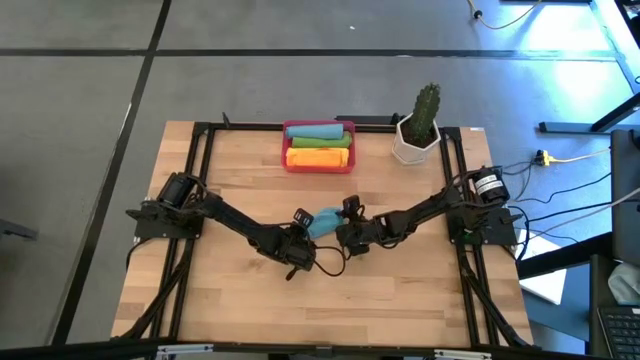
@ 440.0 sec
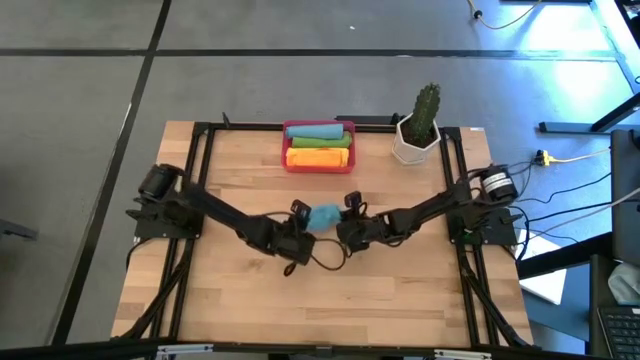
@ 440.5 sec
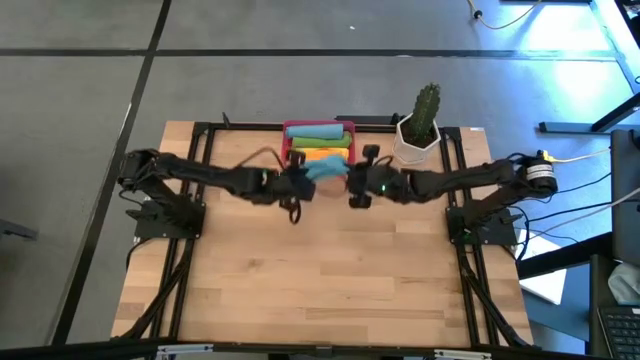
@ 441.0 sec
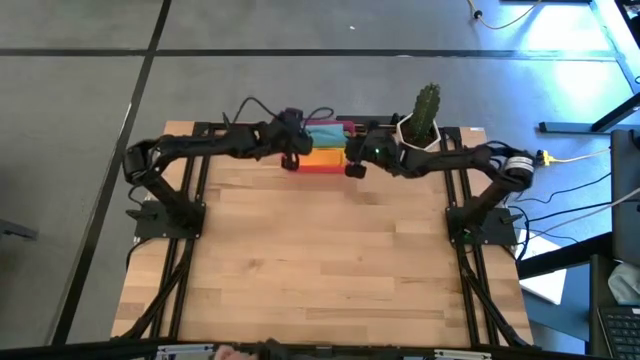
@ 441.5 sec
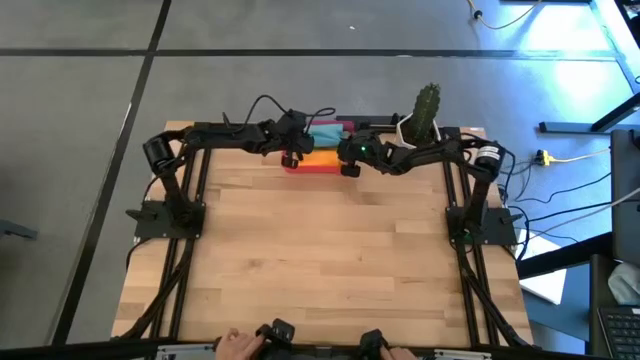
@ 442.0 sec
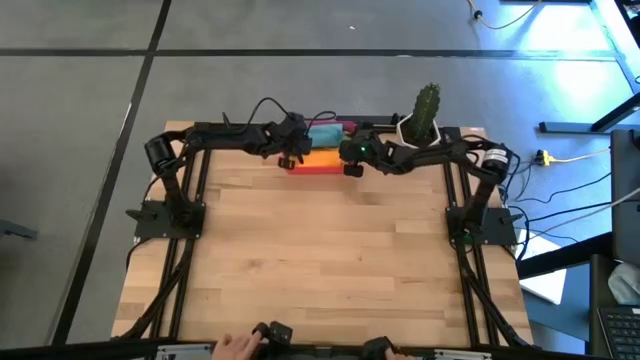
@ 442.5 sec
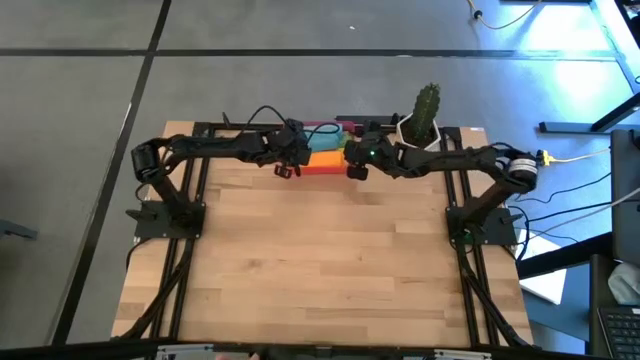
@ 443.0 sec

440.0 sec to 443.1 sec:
Task: Roll microfiber towels into tight, uniform cylinder then place into a basket
Put the rolled blue towel into the red bin

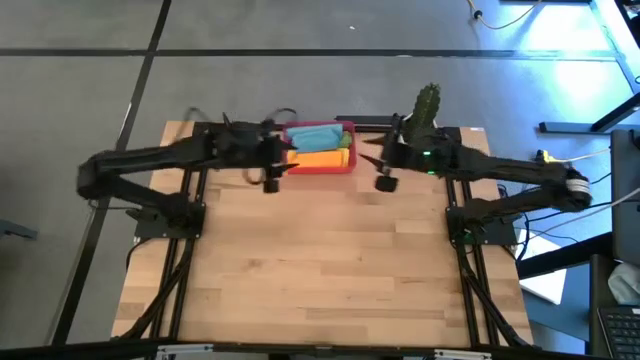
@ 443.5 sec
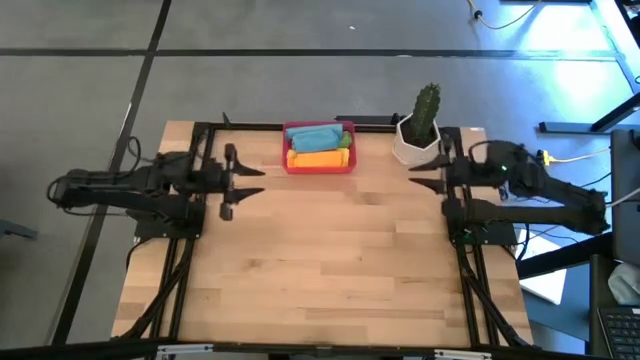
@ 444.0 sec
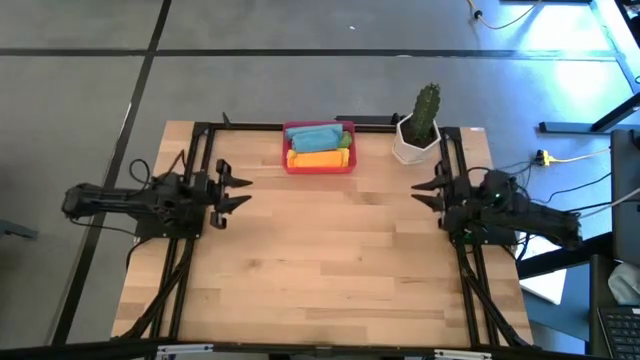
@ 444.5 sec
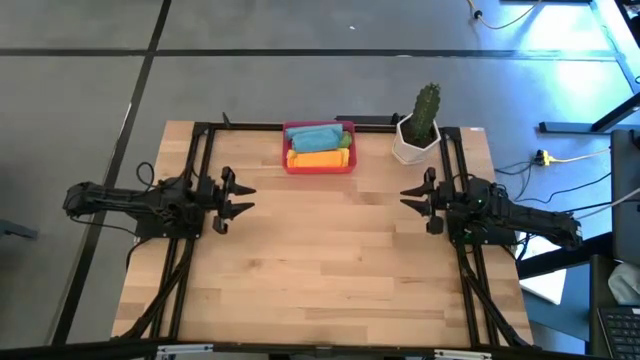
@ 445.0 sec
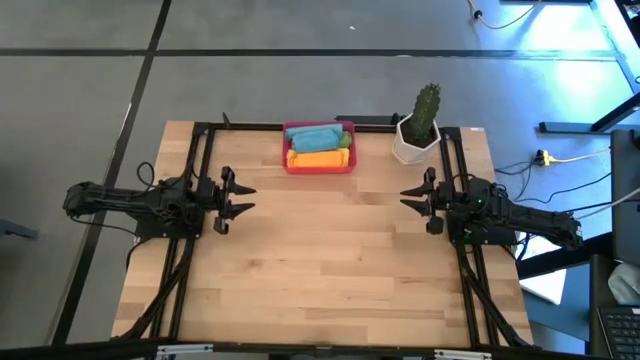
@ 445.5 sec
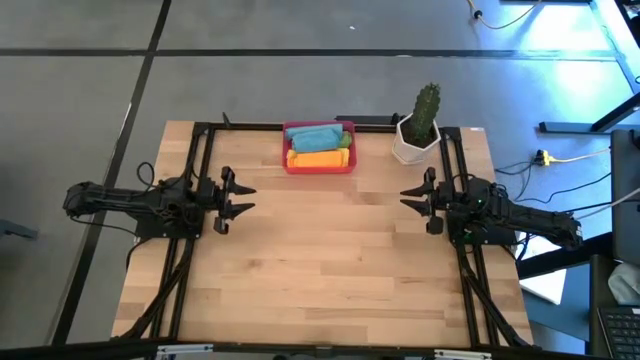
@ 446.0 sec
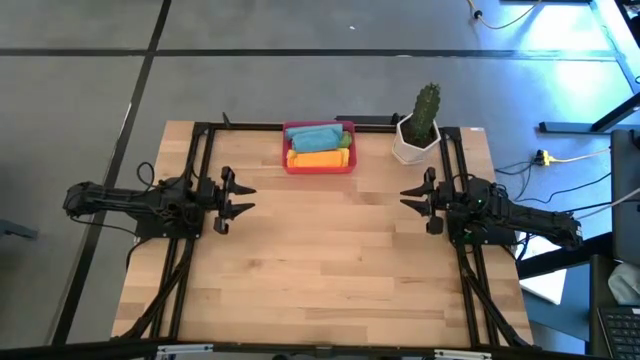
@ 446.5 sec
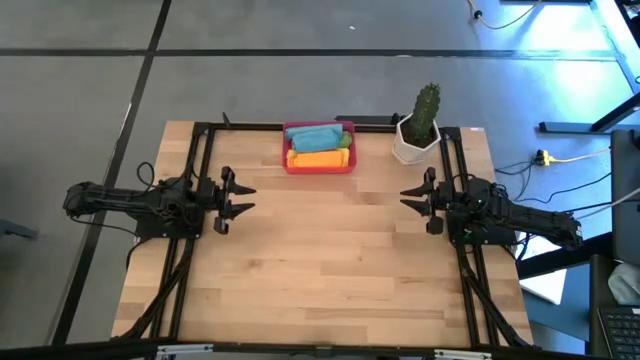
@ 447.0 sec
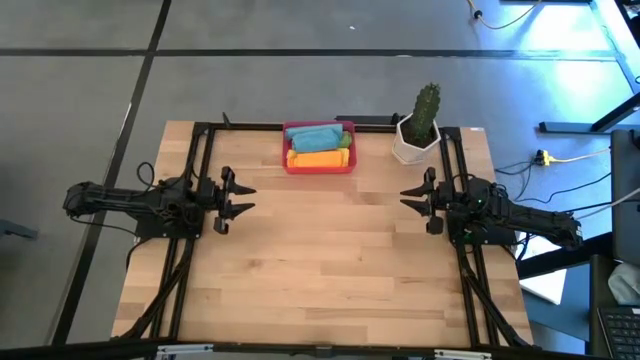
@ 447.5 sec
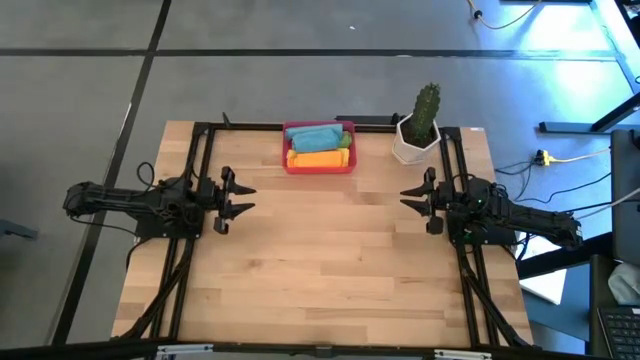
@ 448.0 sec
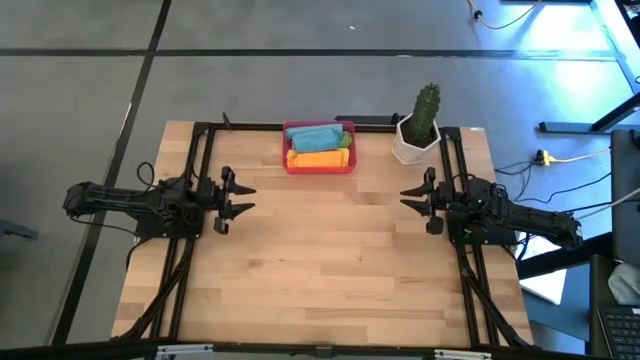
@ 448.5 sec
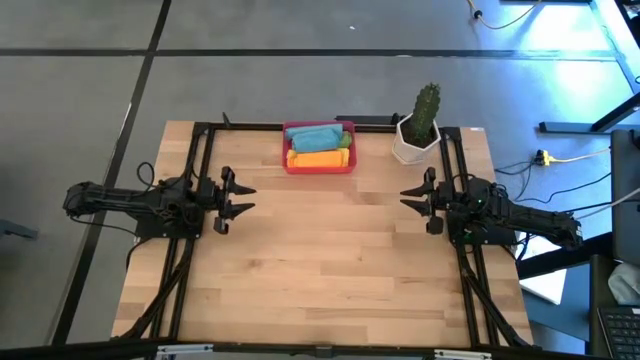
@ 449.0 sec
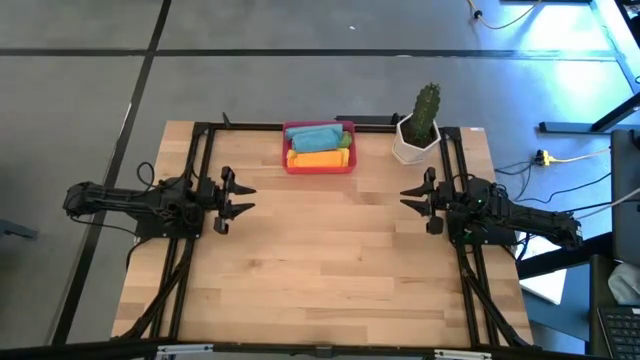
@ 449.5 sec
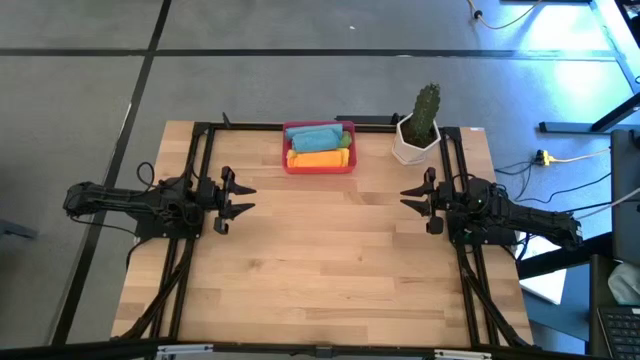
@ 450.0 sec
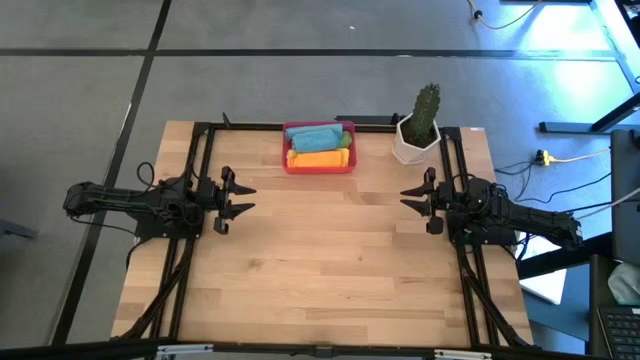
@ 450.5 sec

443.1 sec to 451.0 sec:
Return to home position

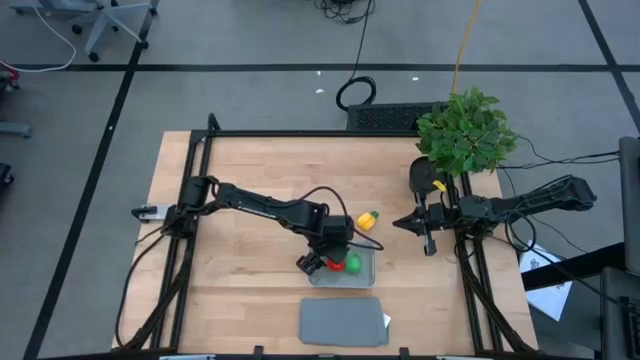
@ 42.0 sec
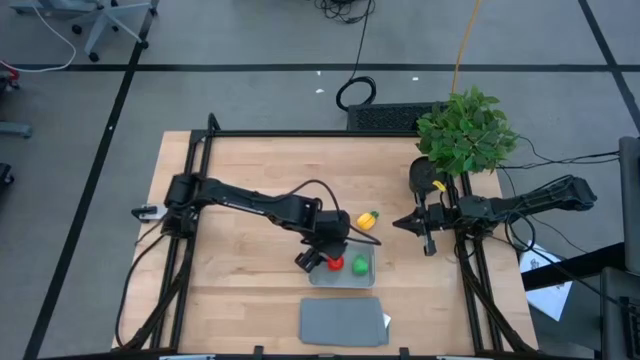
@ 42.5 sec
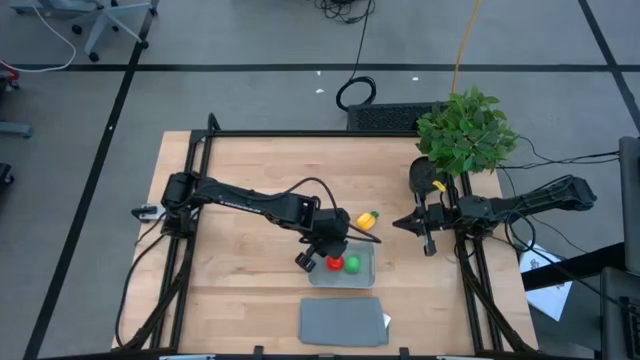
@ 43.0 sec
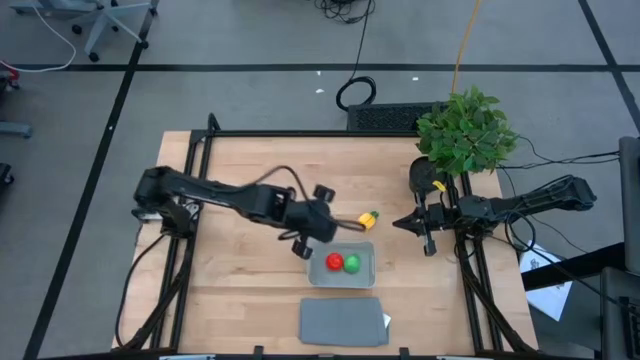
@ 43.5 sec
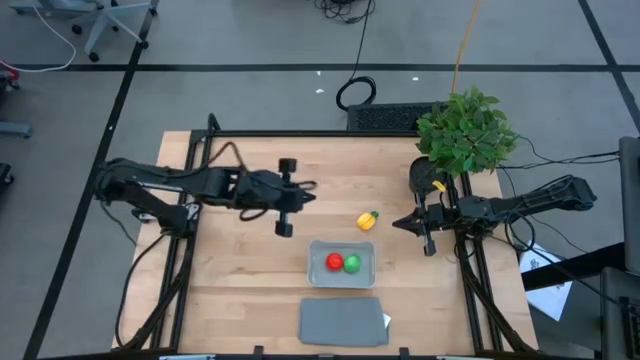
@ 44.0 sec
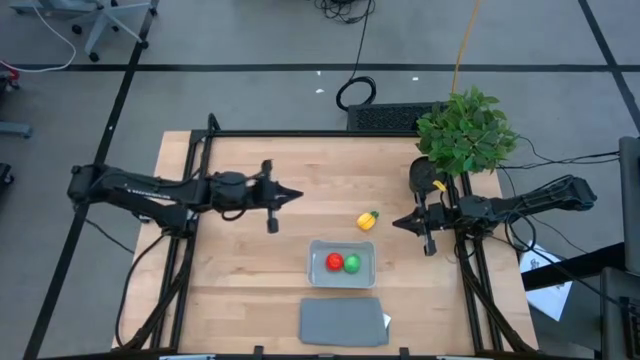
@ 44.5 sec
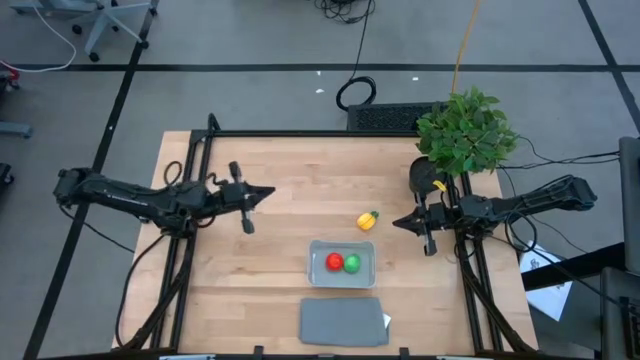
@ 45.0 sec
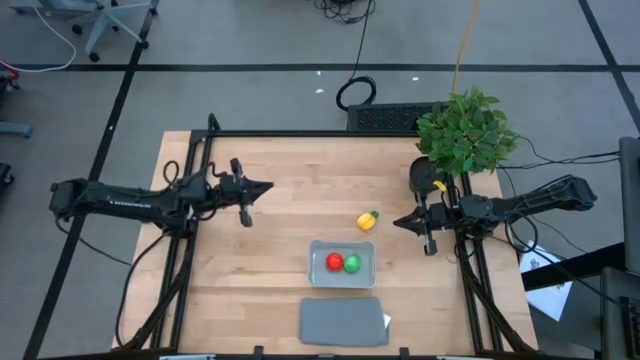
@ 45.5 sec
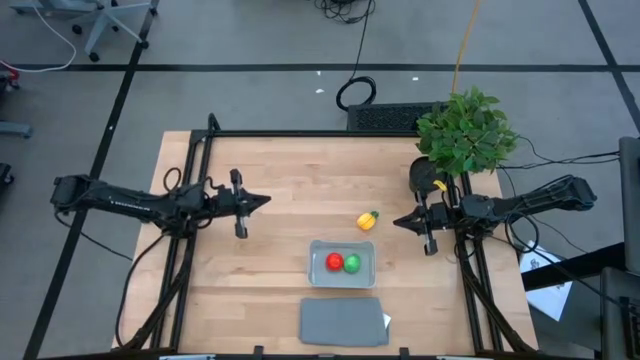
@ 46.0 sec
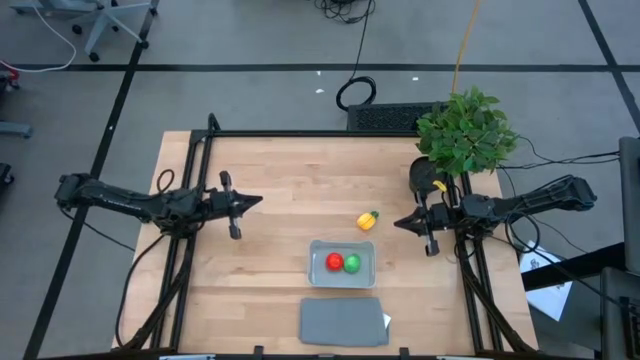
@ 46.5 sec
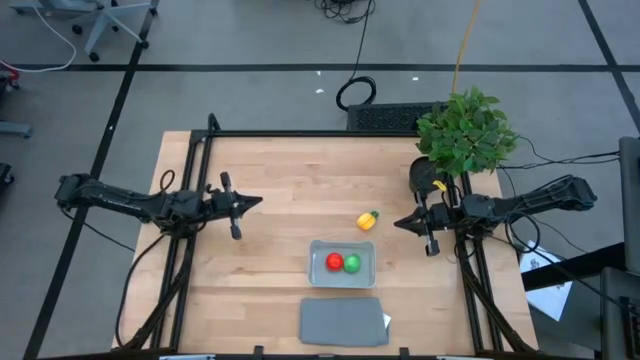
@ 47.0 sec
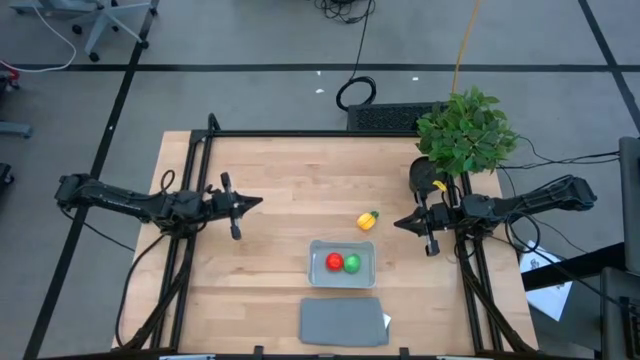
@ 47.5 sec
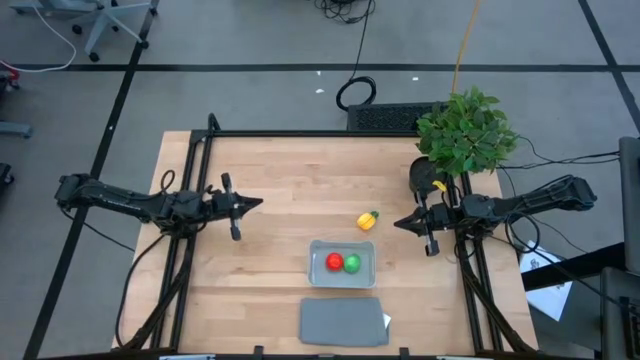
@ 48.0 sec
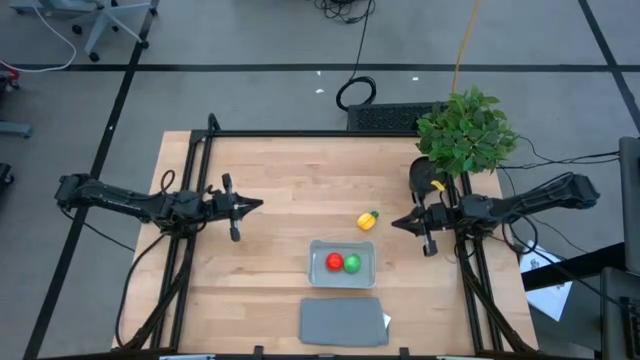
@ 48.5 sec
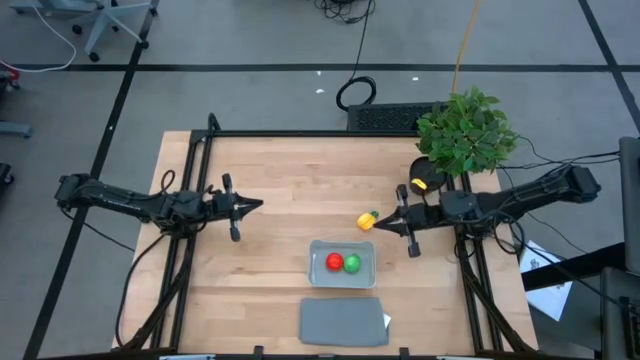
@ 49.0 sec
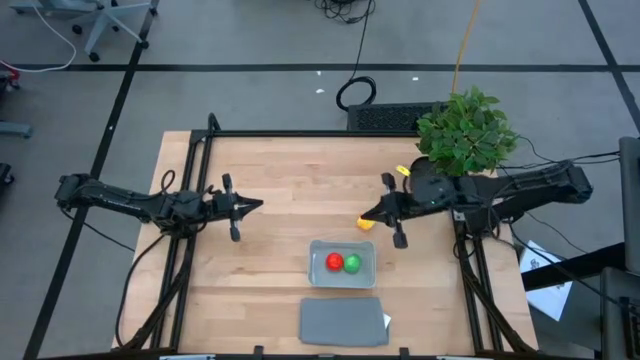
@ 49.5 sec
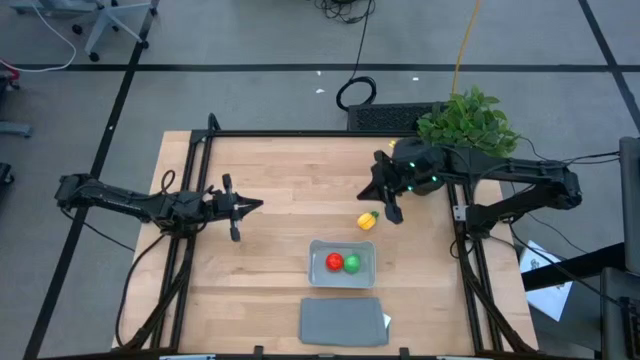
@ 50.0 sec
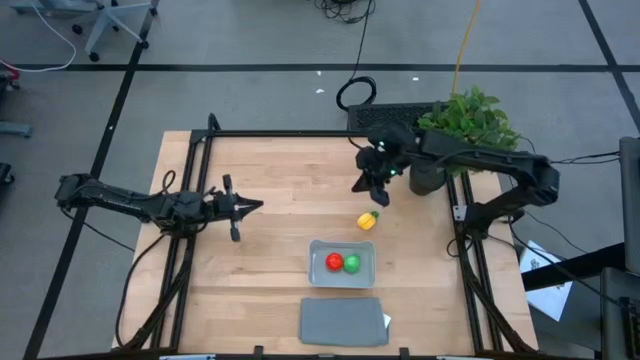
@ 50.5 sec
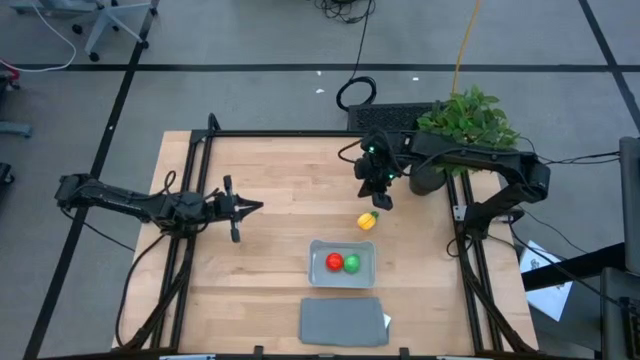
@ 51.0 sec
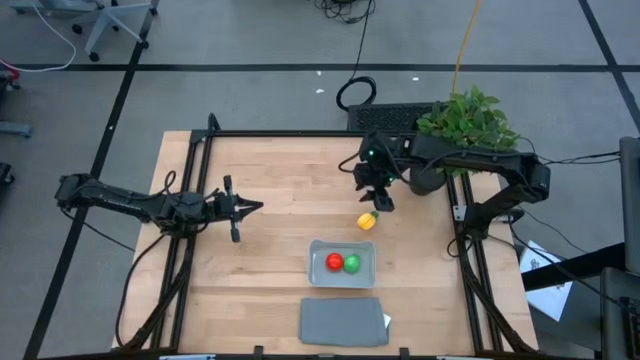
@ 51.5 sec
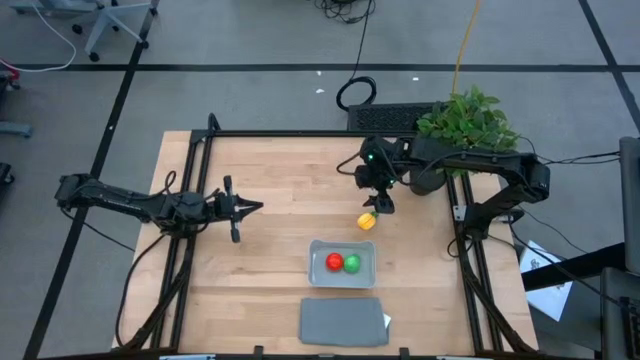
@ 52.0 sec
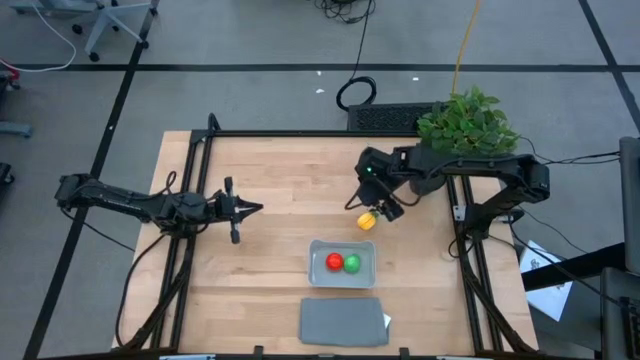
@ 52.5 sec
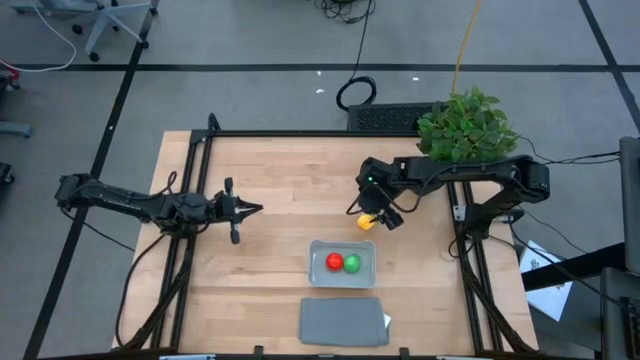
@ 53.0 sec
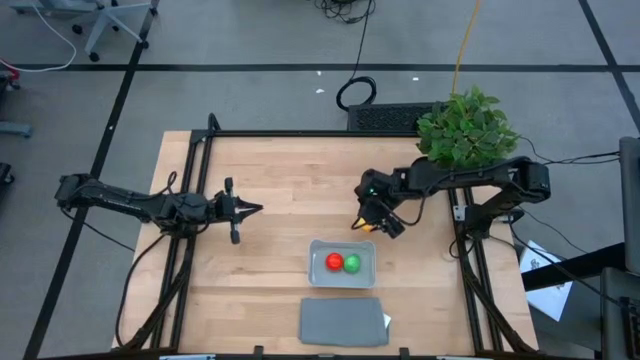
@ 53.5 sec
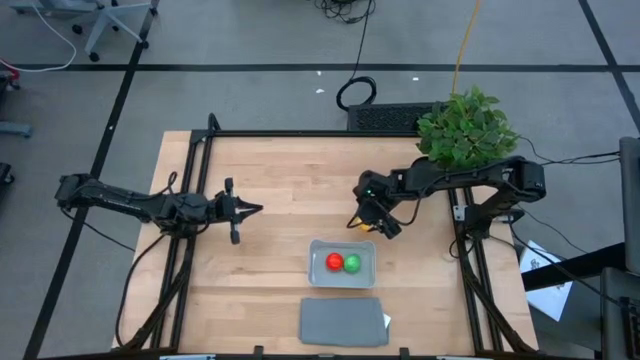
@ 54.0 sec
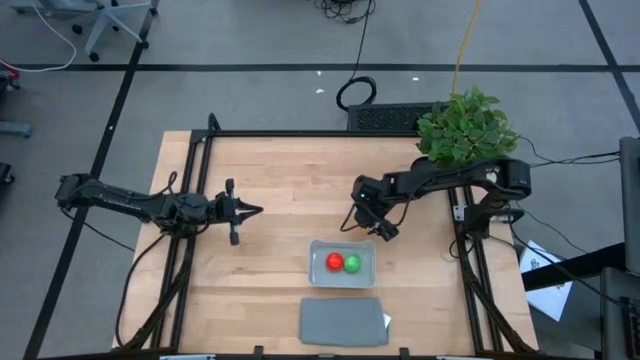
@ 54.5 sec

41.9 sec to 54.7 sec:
Task: Pick and placing Produce into tupperware
Put the yellow pineapple into the gray bin
